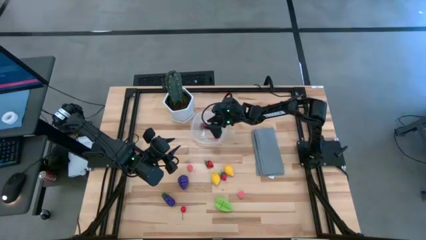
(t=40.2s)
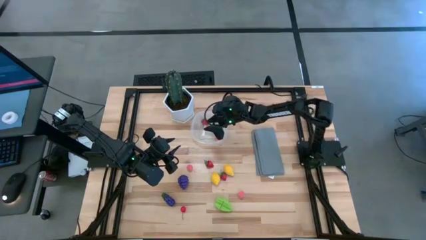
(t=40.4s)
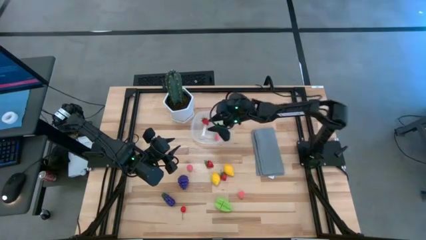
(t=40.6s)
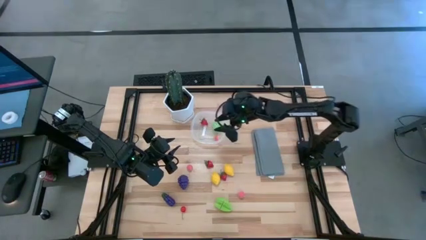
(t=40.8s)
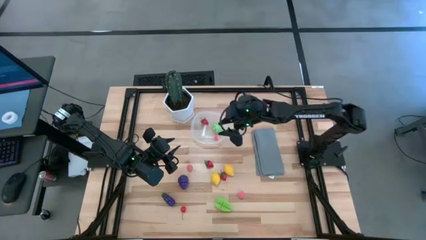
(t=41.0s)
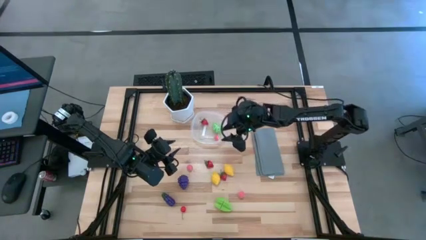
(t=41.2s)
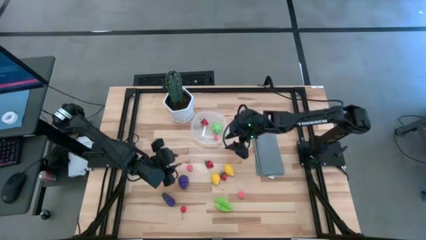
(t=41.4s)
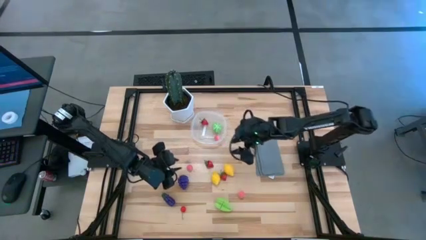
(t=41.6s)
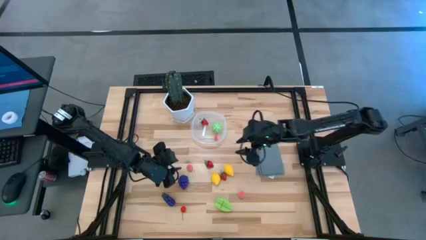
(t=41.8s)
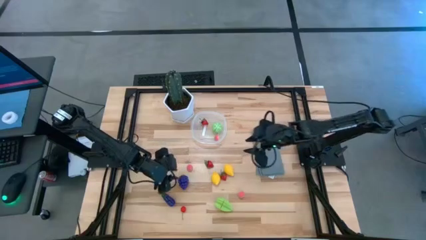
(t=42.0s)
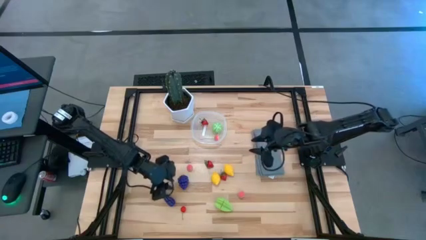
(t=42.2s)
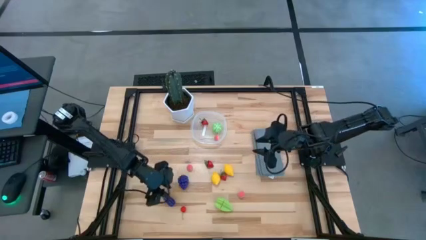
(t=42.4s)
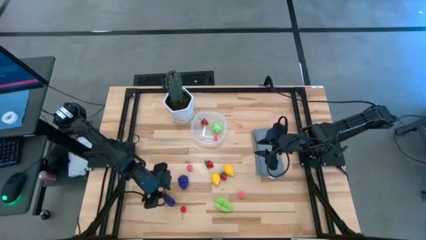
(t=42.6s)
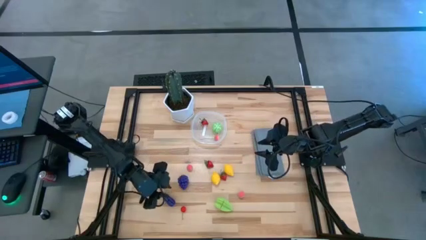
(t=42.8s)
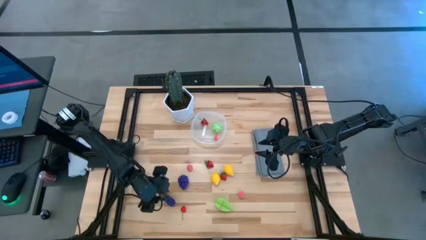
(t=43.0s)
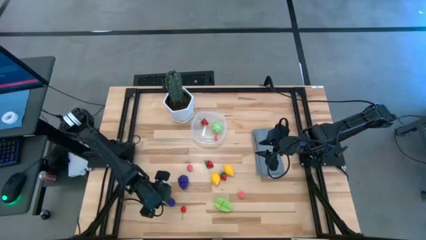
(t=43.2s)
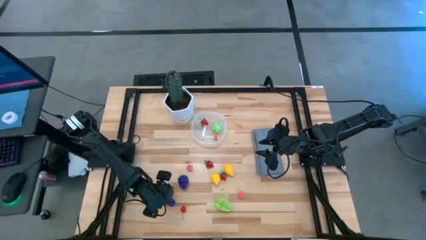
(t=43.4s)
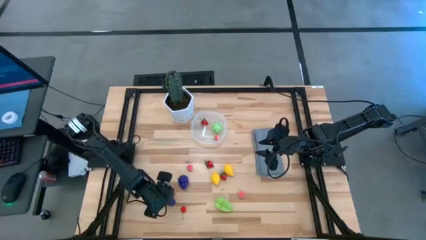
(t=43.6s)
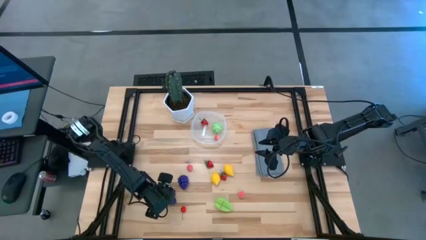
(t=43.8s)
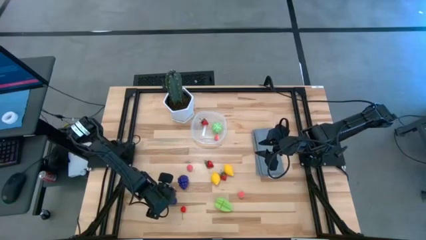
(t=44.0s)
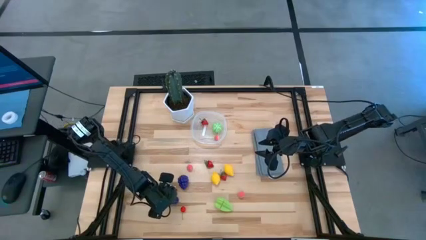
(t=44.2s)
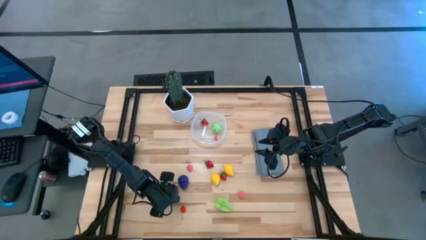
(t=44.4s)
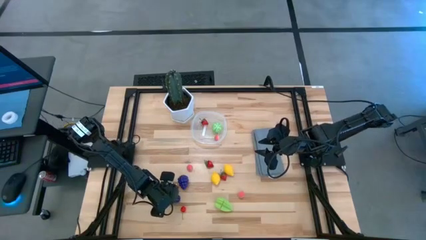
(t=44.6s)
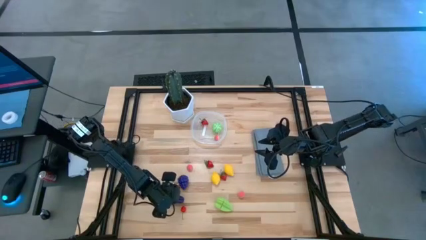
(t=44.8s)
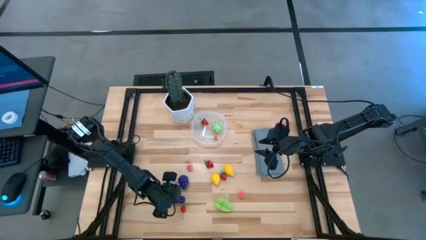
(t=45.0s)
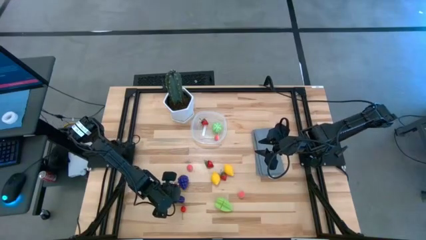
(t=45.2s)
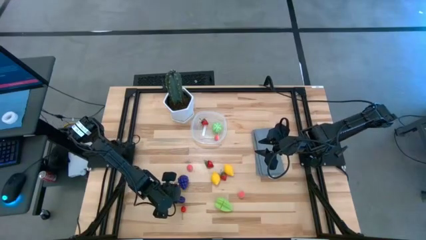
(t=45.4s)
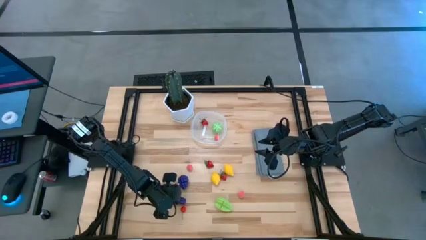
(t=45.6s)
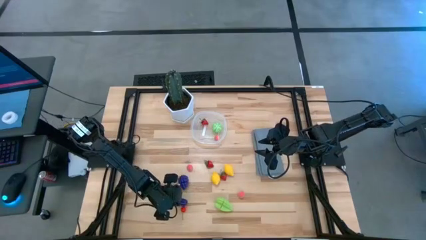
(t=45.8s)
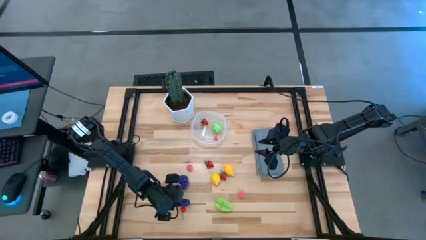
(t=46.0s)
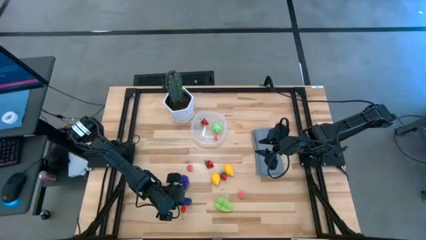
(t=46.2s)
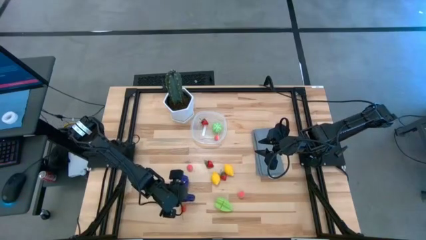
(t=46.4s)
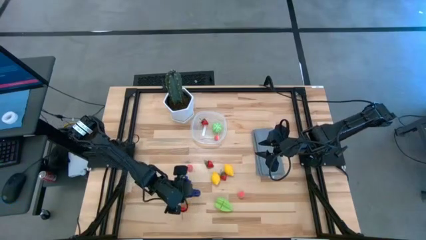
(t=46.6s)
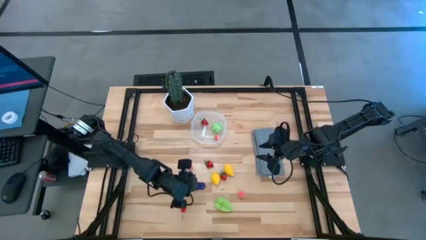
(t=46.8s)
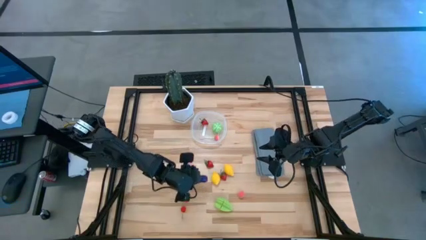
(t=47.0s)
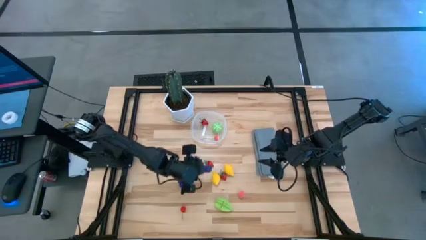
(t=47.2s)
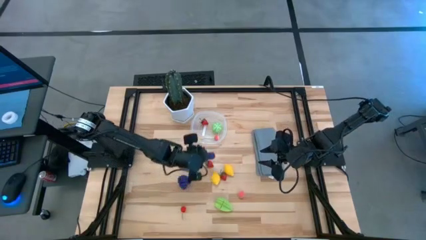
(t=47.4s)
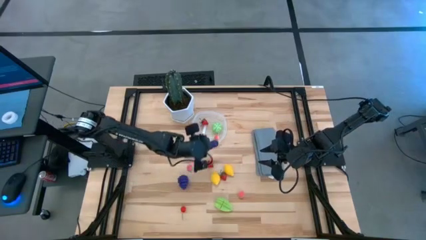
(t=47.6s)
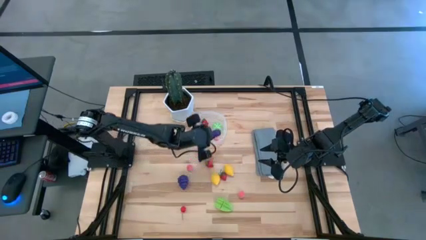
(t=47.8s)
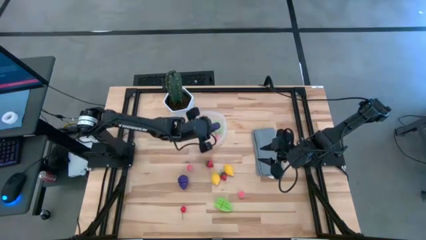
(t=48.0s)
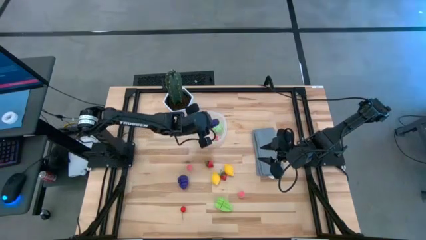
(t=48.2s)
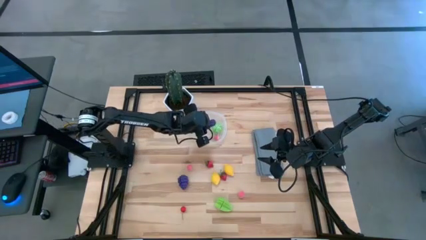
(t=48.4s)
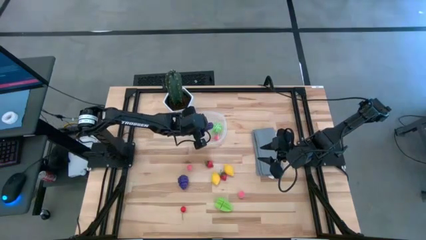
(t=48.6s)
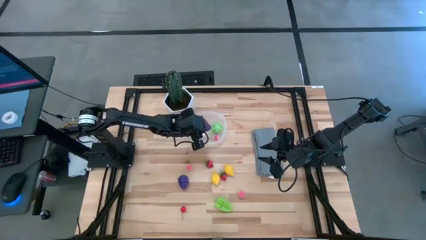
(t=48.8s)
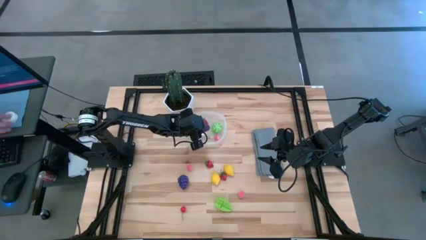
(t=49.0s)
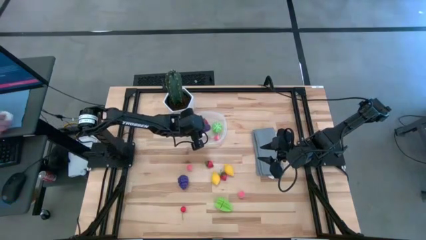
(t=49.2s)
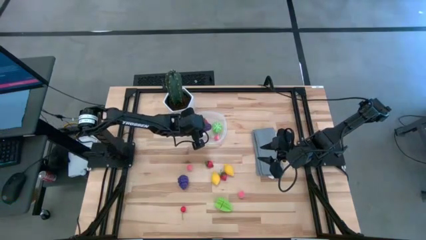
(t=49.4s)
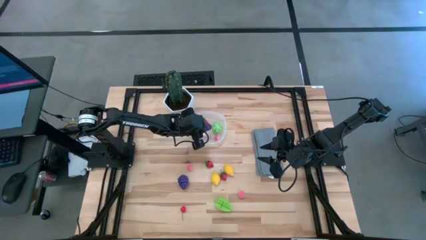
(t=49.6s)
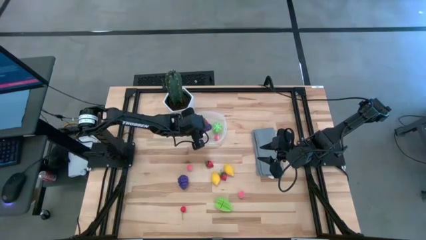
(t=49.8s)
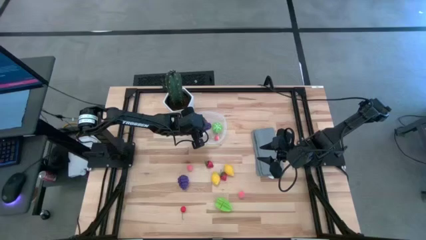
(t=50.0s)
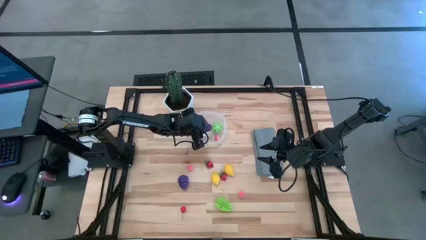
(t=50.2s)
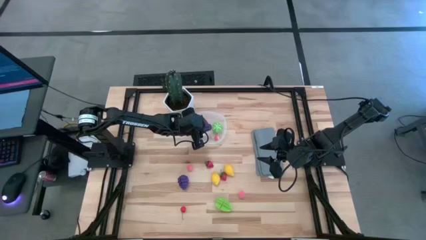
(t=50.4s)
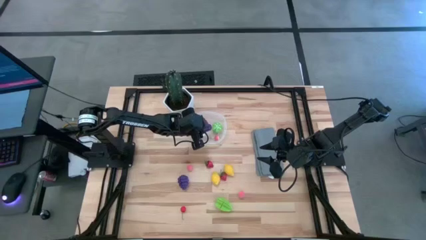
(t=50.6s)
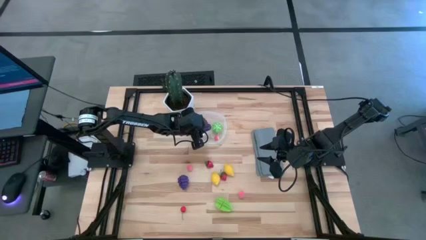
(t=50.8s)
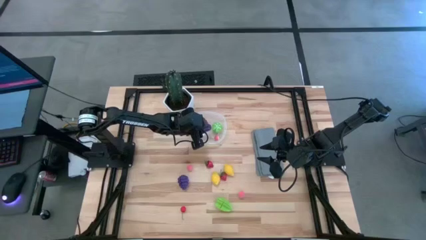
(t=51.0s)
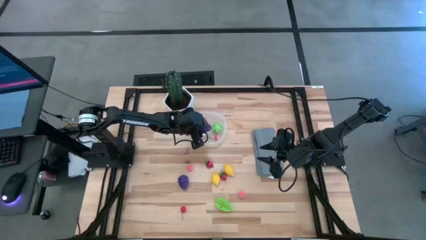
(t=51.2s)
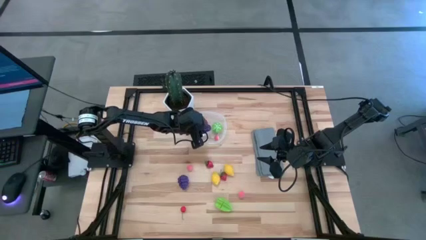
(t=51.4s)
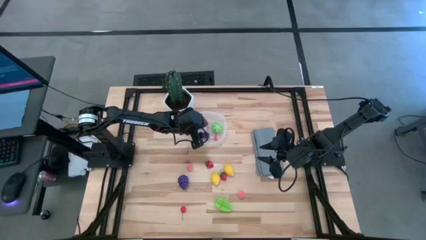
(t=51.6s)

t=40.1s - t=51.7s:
Task: Pick and placing Produce into tupperware
Put the eggplant into the transparent bin
